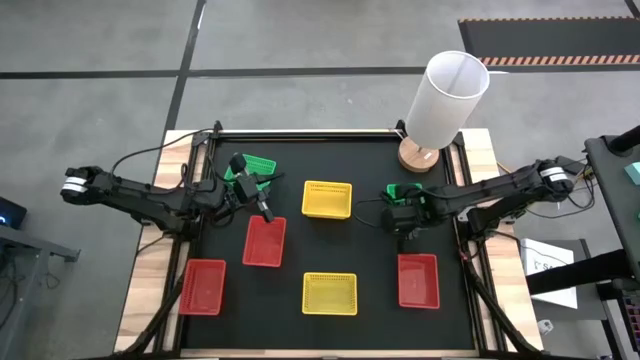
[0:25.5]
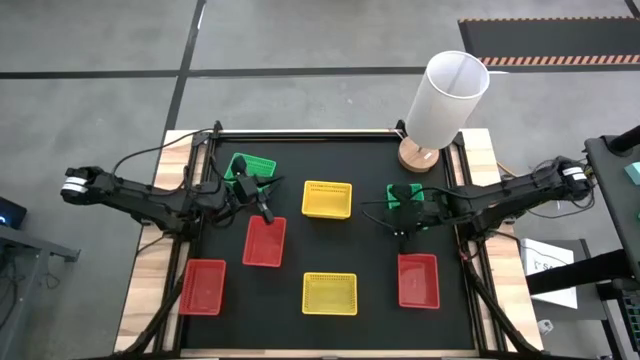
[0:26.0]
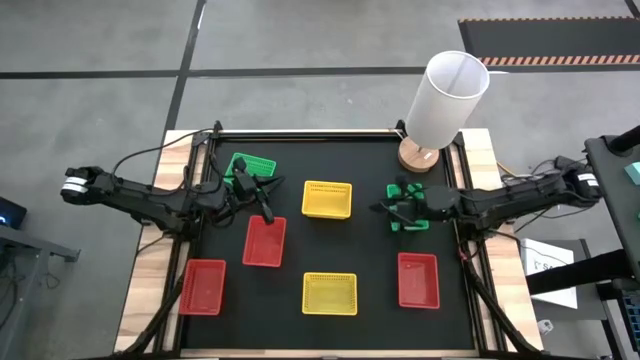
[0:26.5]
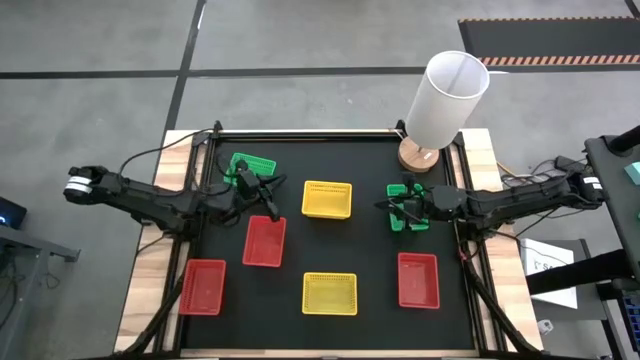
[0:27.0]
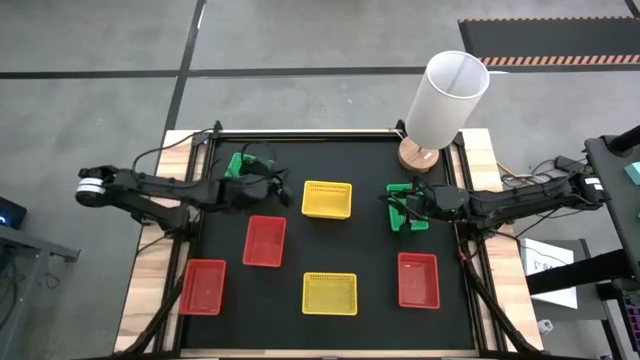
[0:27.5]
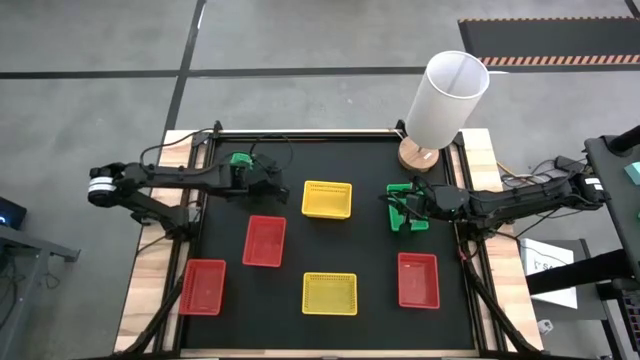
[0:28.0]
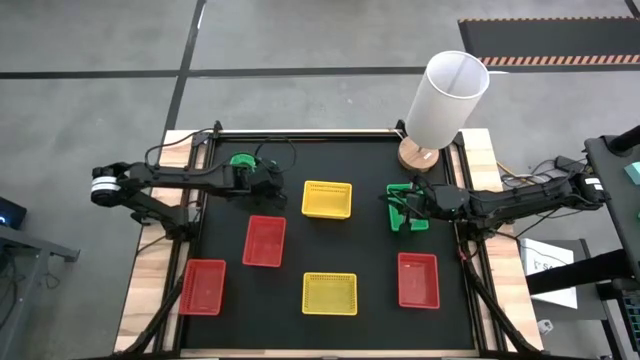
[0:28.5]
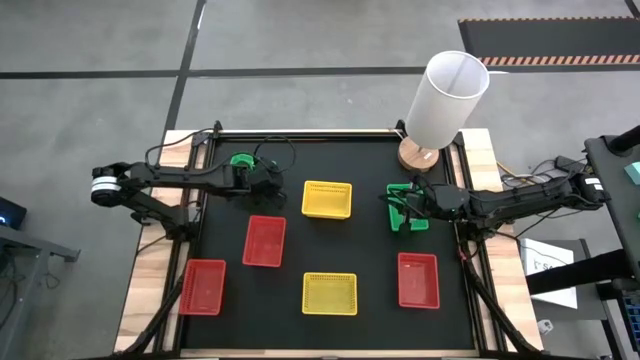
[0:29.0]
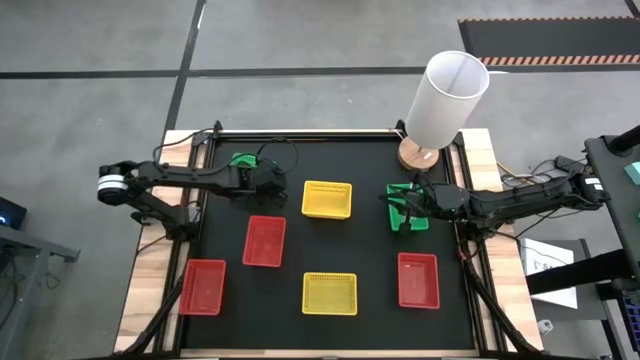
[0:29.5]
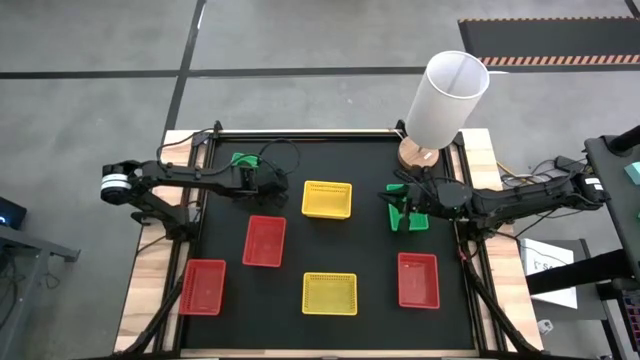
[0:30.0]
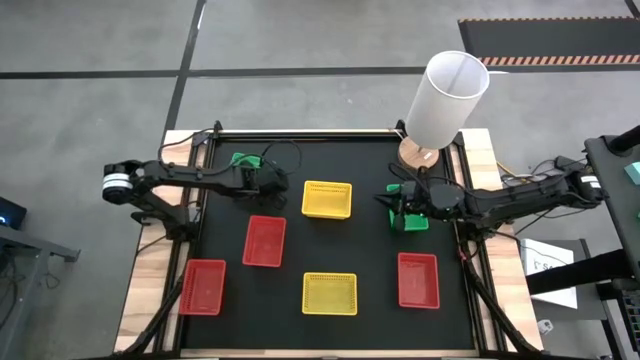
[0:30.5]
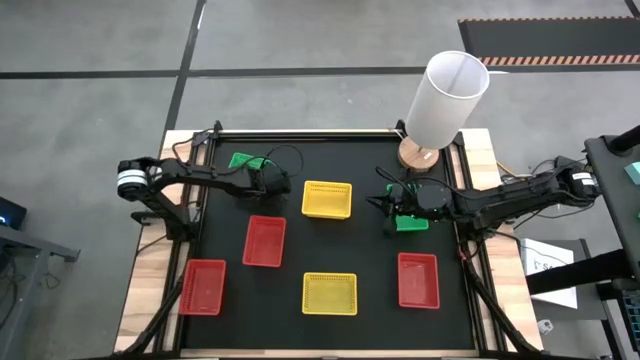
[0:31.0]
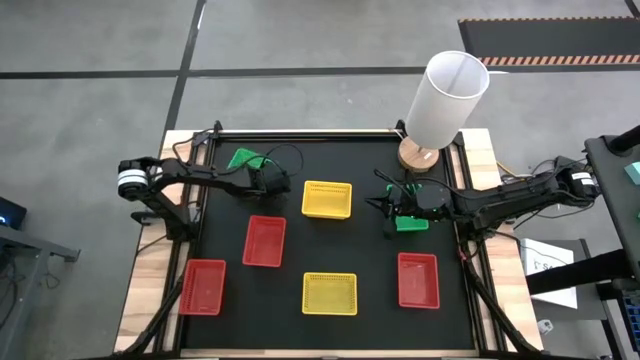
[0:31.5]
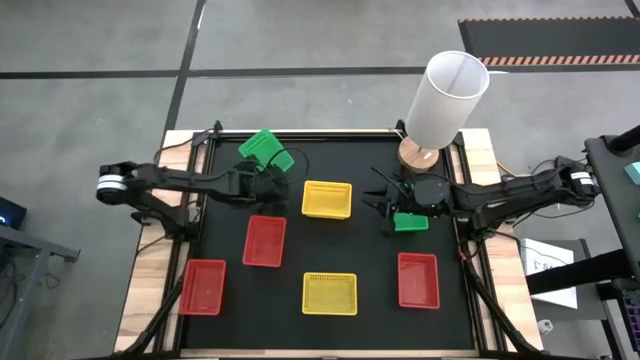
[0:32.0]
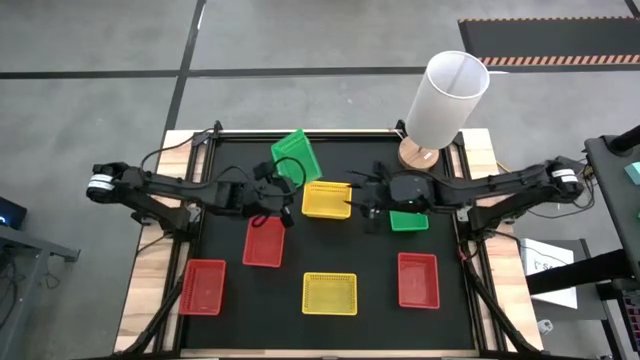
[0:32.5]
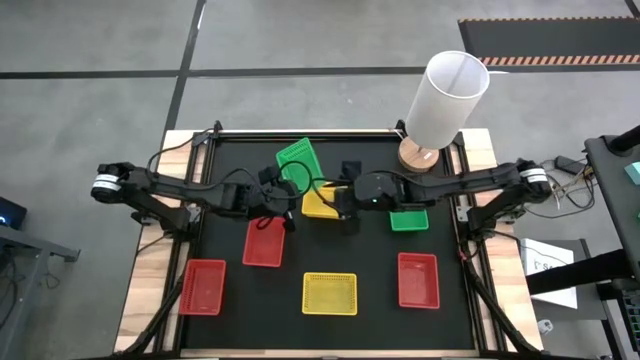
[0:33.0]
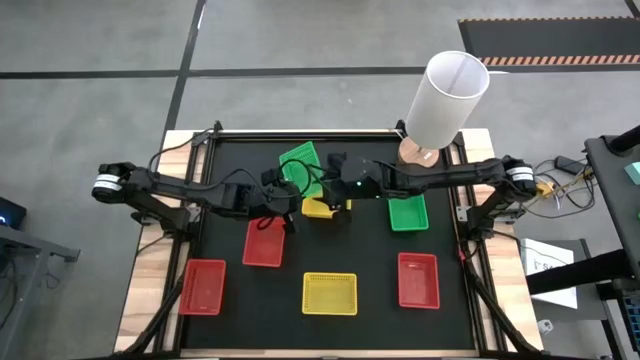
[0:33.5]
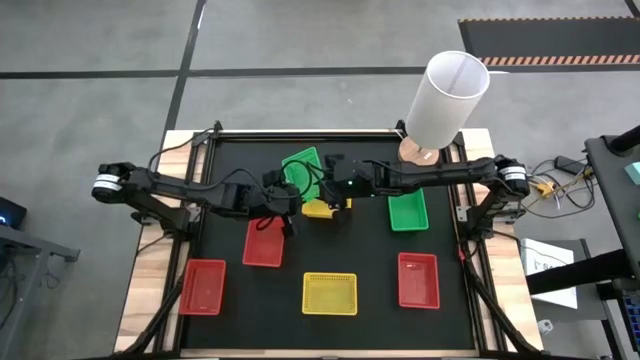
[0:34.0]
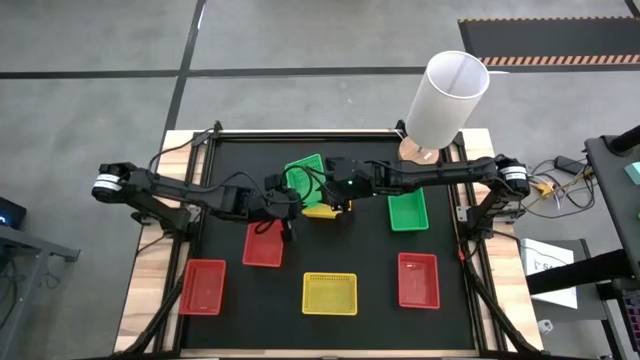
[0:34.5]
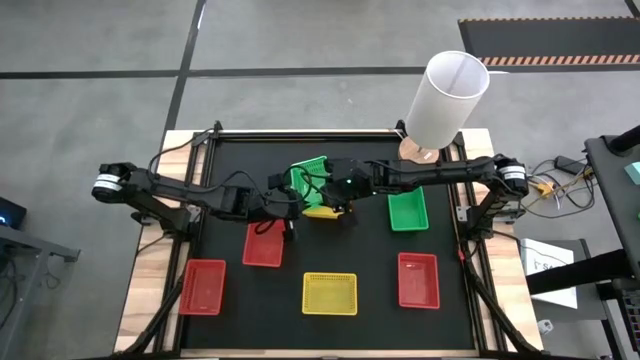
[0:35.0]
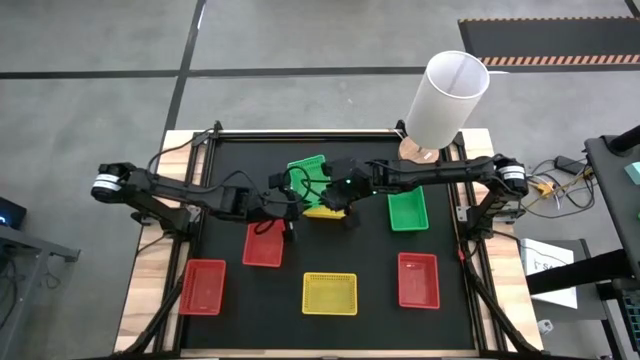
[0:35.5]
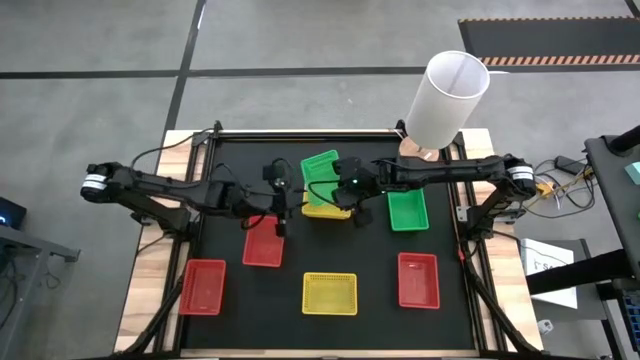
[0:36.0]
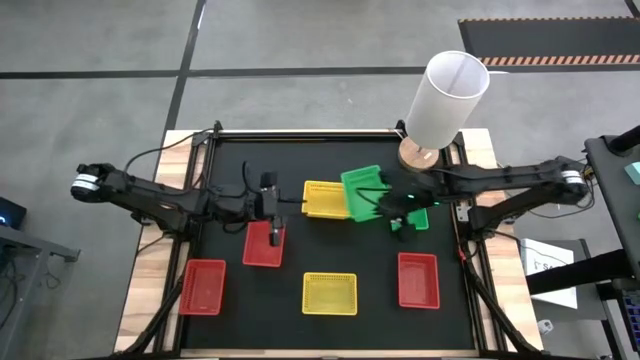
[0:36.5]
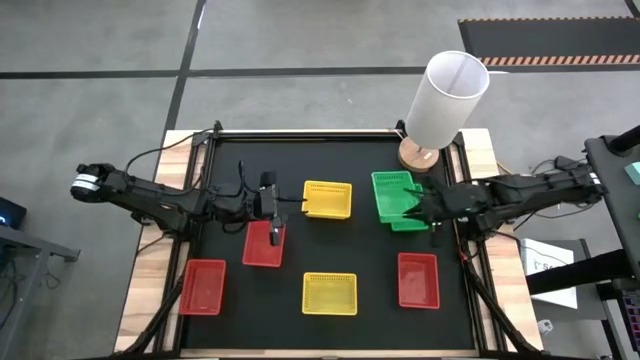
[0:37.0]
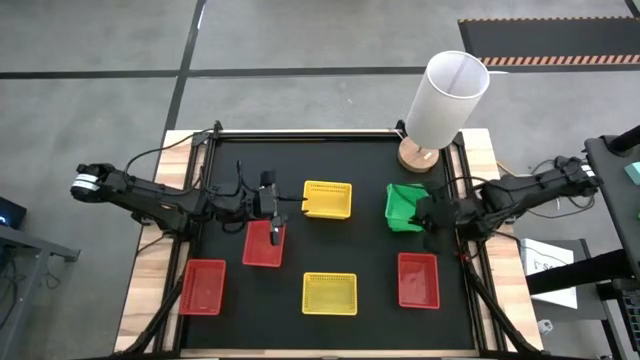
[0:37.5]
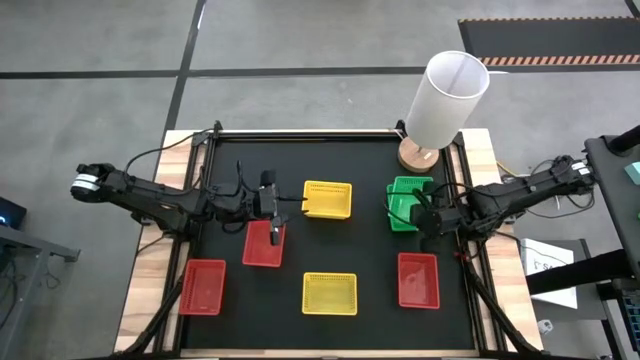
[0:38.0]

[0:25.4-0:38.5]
Stack the green basket on top of the right green bin

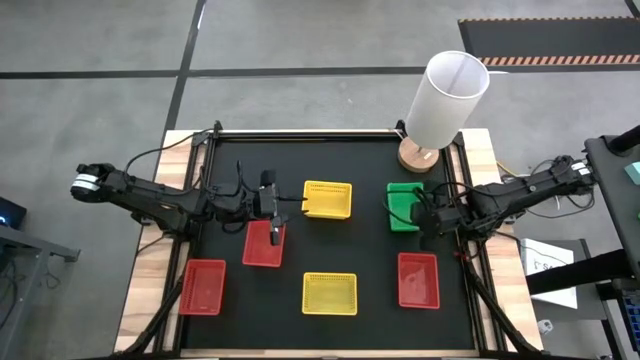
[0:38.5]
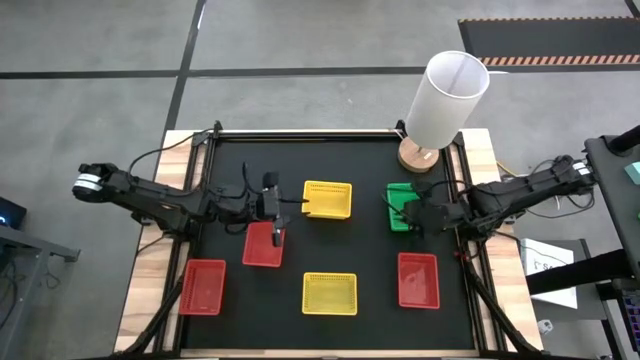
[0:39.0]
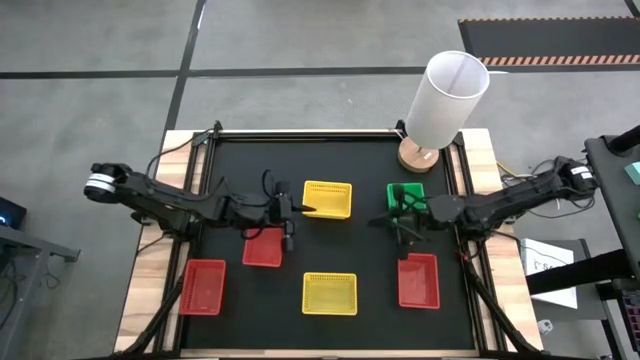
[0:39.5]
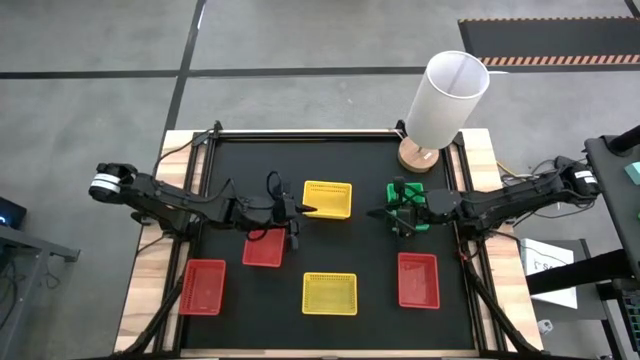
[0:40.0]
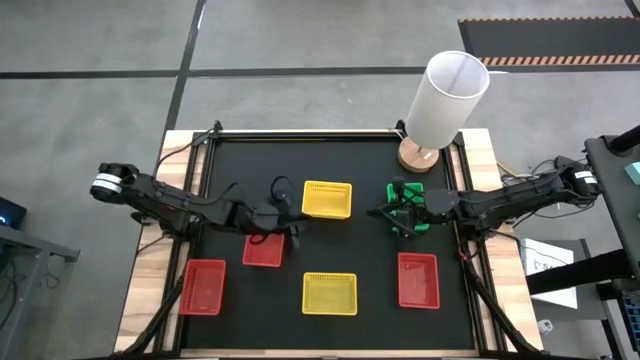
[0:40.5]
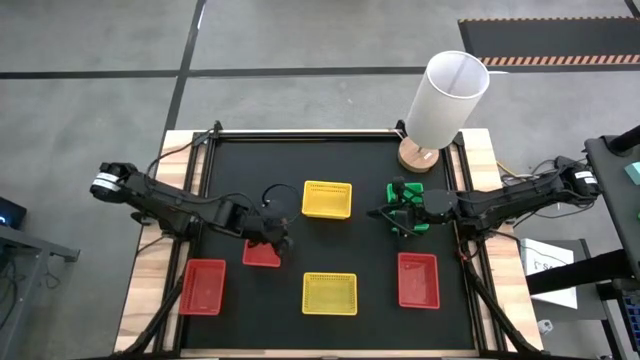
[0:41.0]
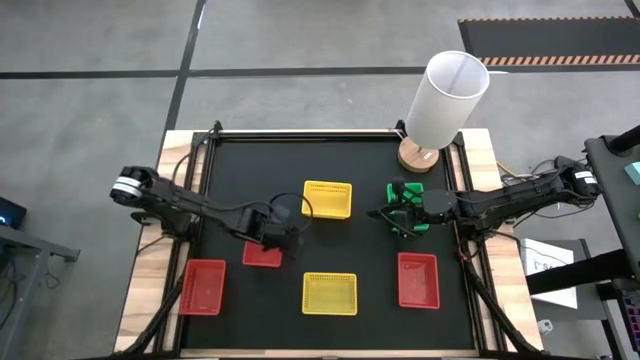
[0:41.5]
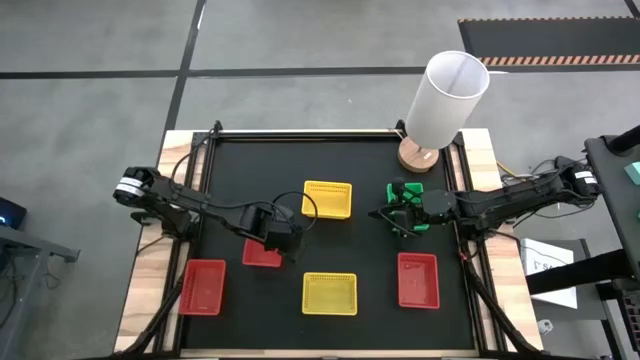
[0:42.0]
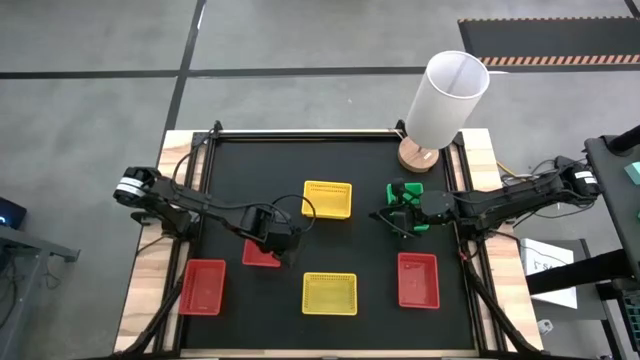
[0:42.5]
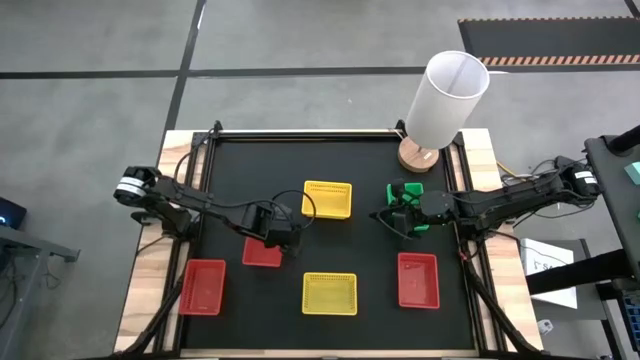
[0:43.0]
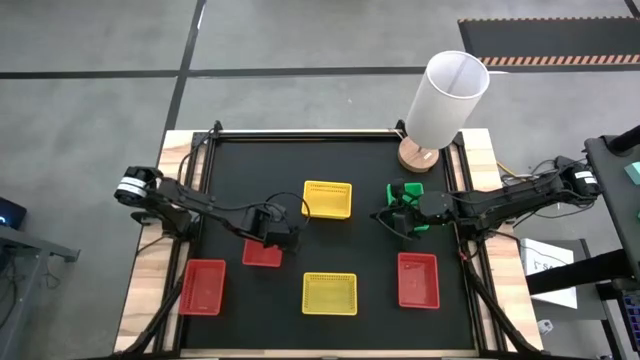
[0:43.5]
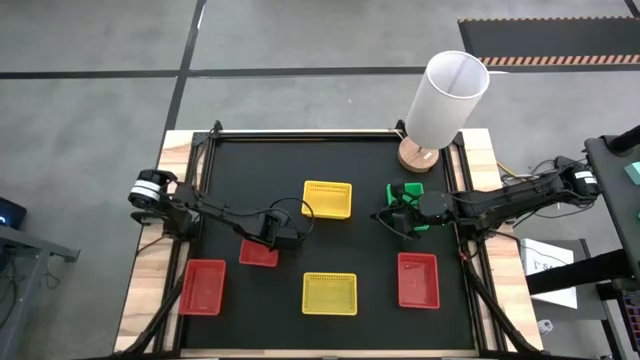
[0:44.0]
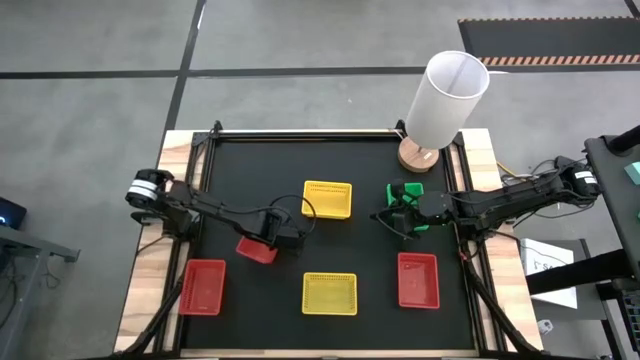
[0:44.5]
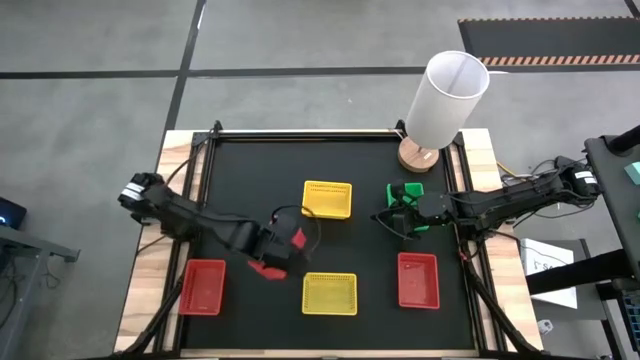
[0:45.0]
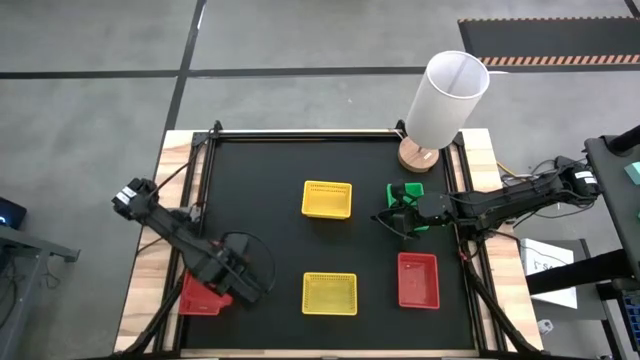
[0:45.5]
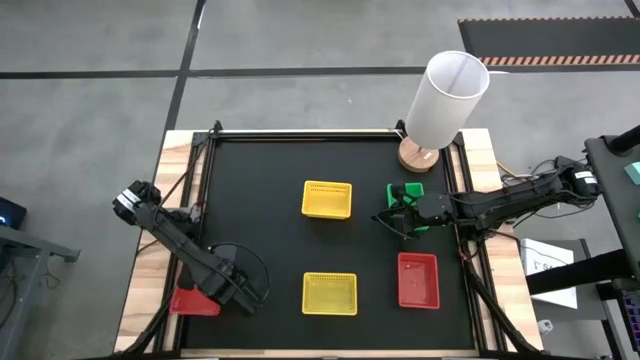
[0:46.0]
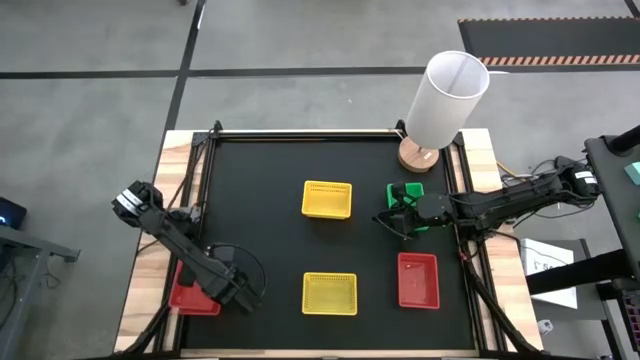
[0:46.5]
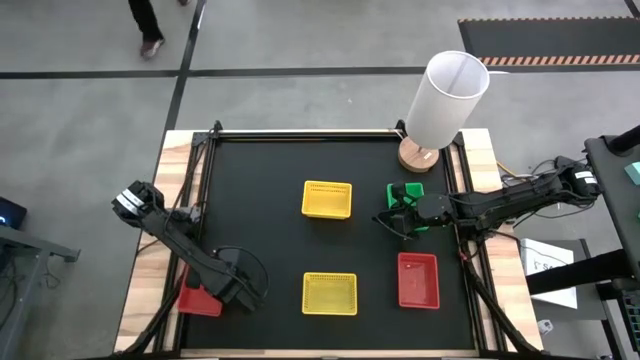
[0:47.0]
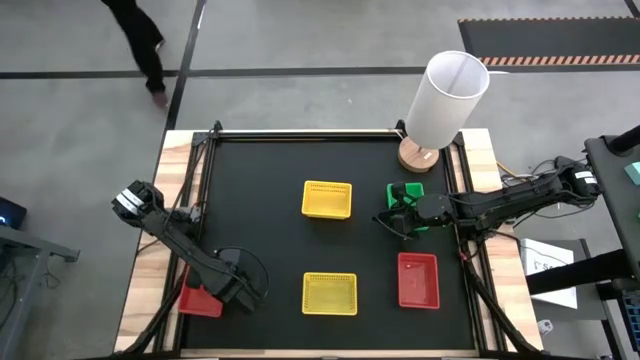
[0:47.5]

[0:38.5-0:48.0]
Stack the center red bin on top of the left red bin
